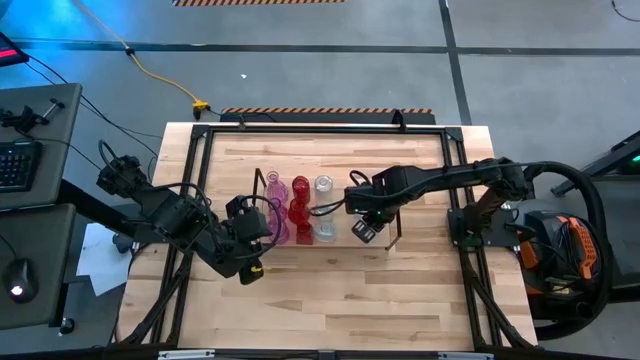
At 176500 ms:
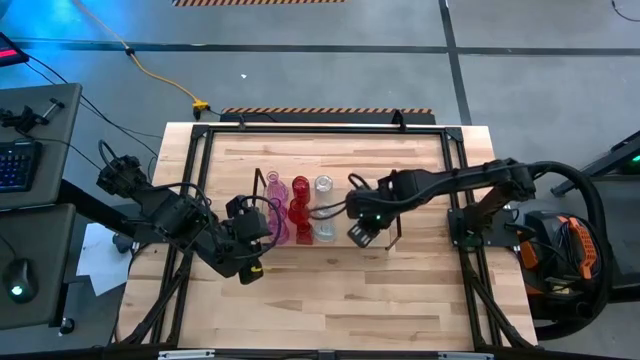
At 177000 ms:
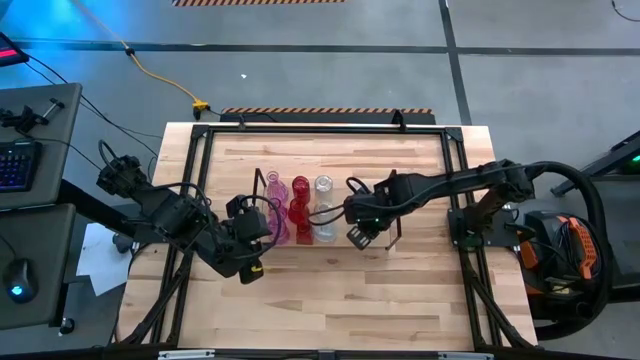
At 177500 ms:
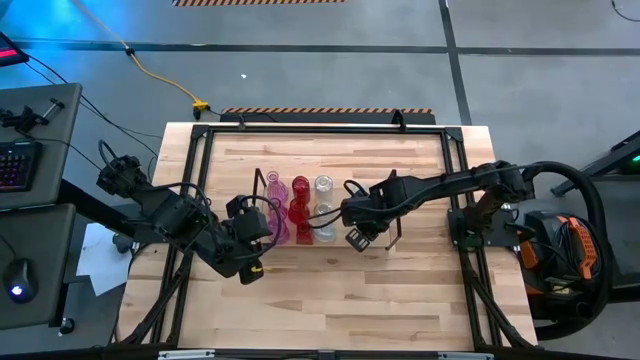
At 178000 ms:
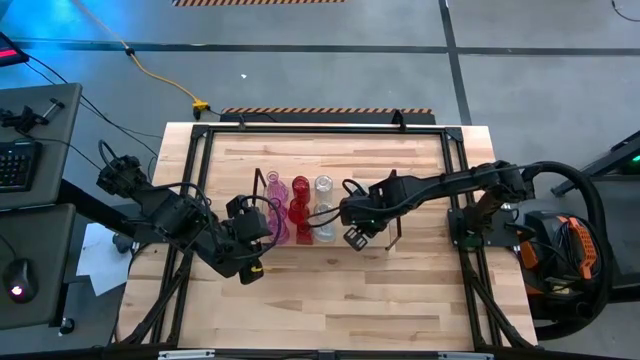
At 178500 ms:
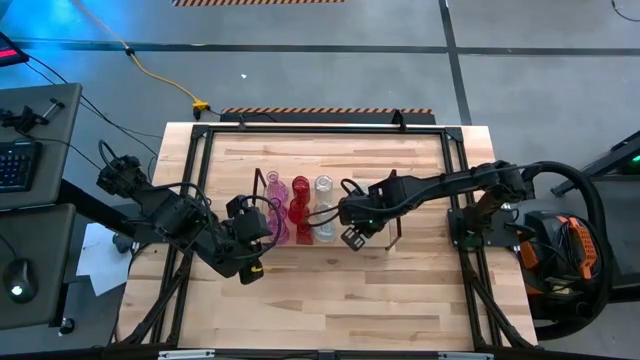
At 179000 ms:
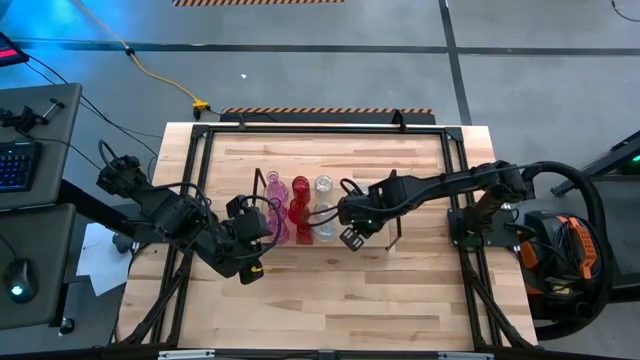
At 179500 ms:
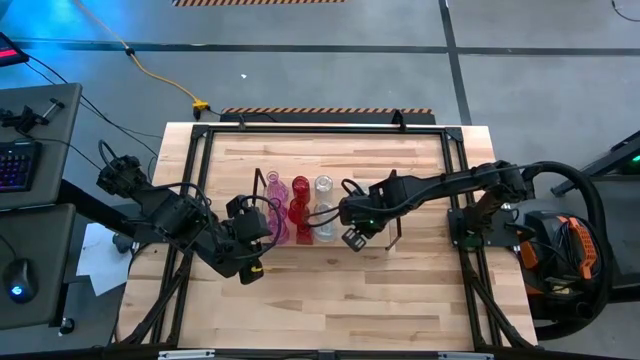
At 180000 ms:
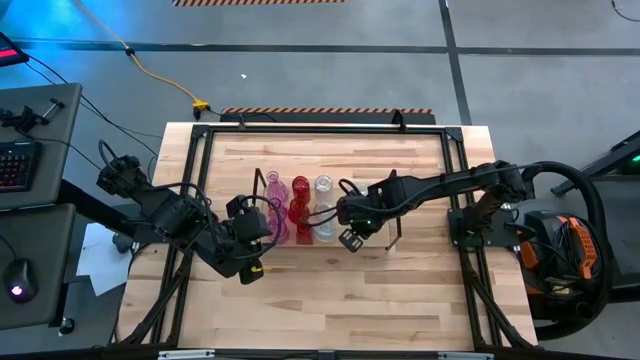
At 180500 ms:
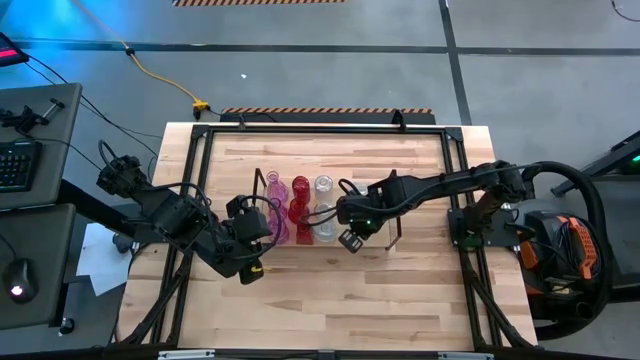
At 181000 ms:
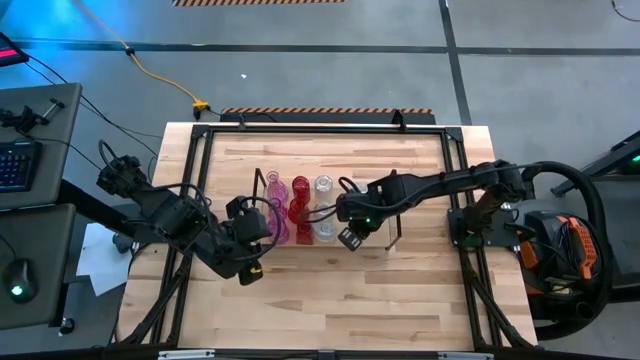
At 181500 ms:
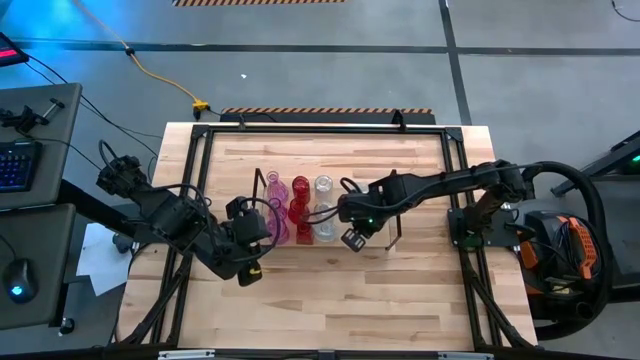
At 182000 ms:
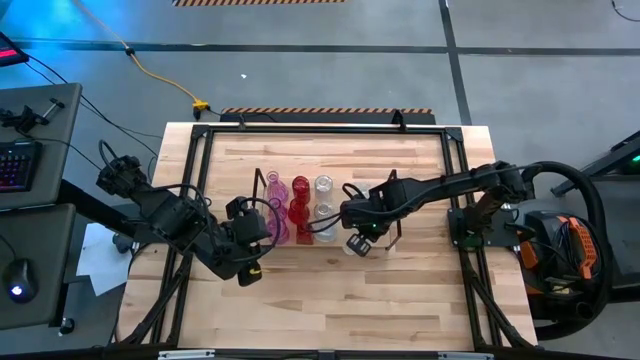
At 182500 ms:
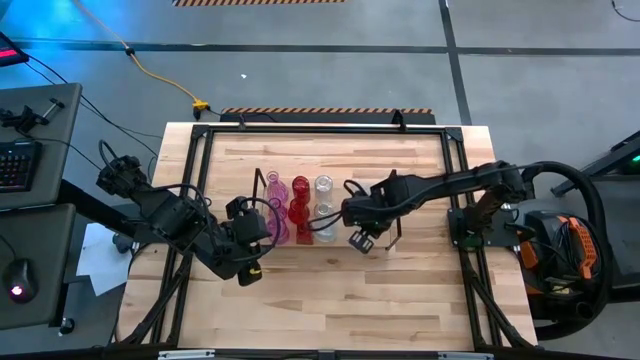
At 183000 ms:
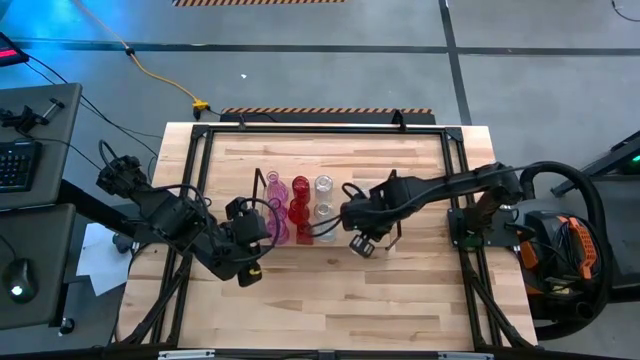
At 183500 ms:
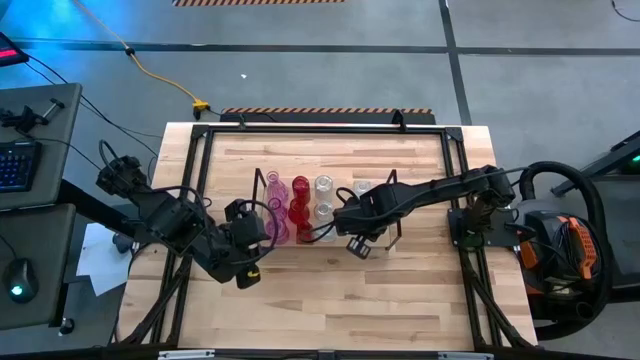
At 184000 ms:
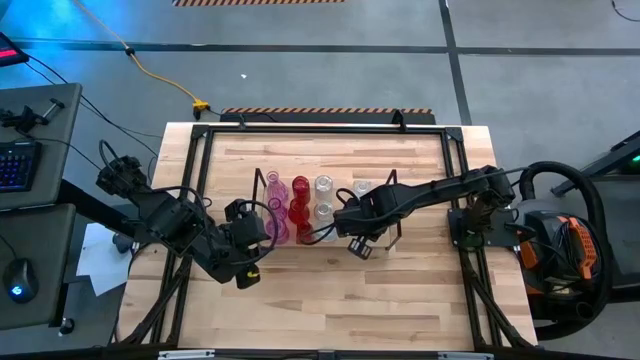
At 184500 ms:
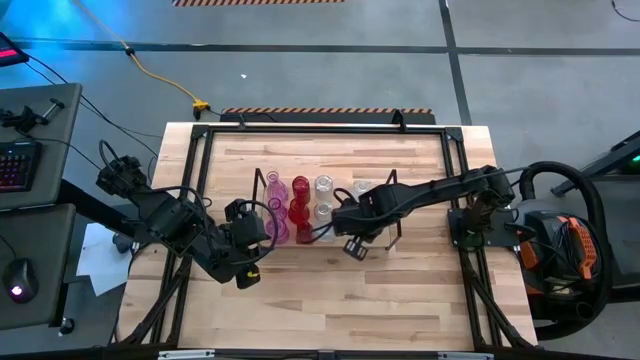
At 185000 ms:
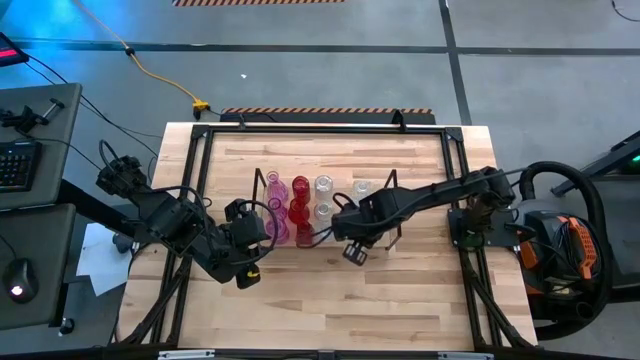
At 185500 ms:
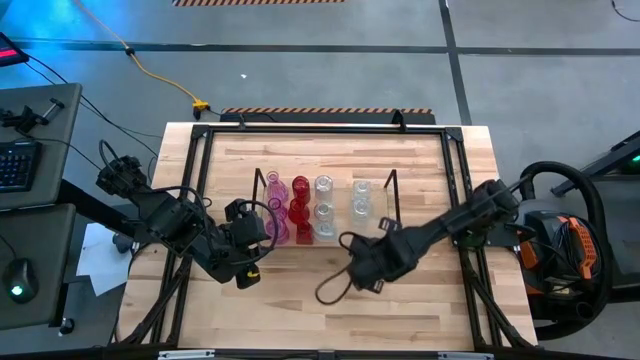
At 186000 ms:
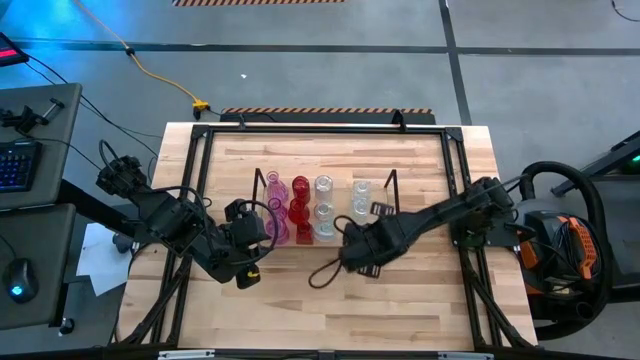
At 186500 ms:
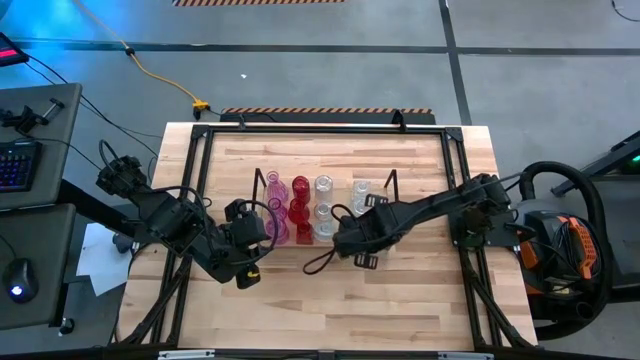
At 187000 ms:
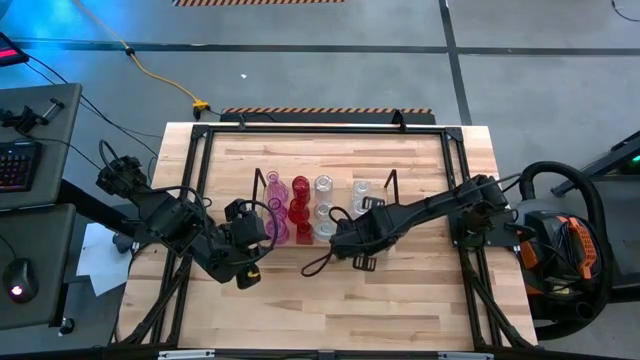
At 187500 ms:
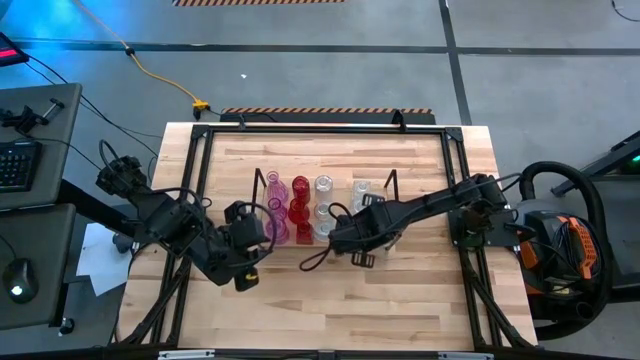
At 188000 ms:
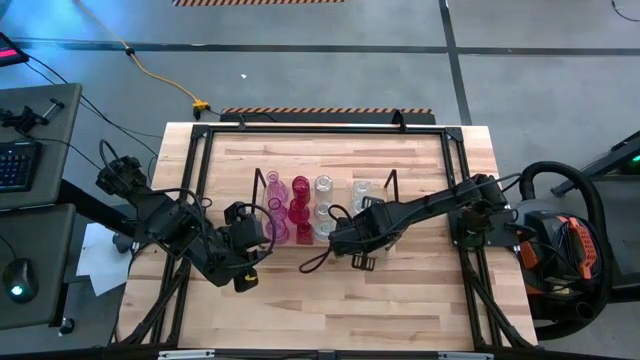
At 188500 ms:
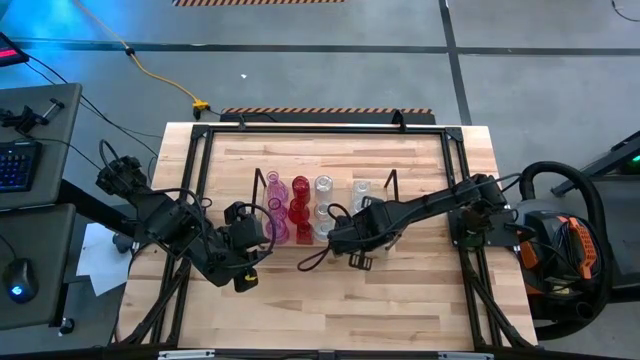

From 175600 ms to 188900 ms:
Task: sort vases onto shelf
Put the transparent vase aligned with the other transparent vases on the shelf

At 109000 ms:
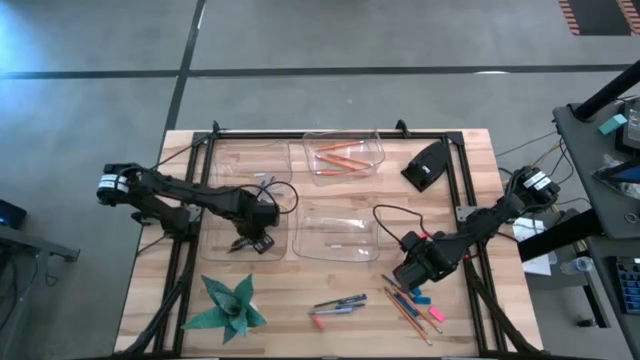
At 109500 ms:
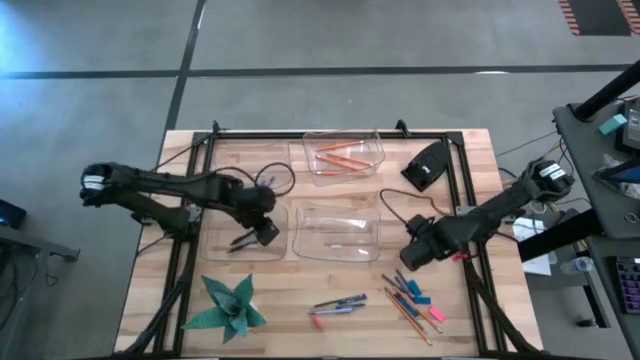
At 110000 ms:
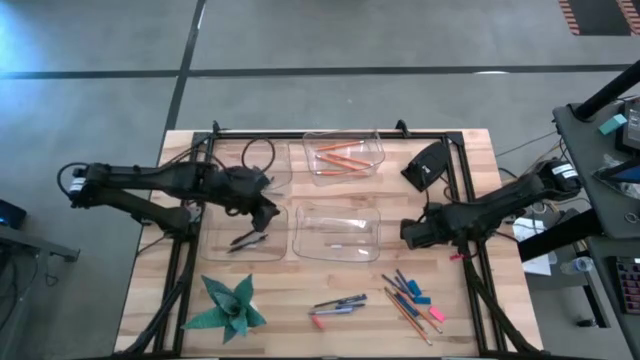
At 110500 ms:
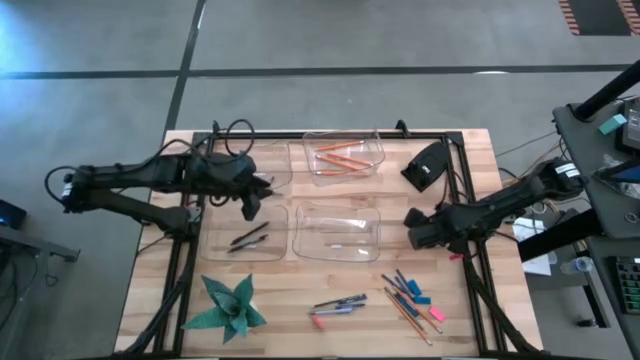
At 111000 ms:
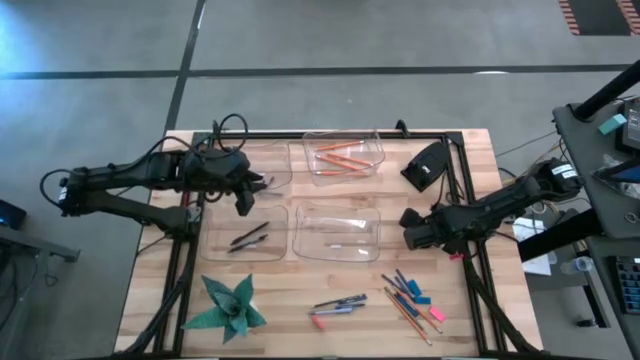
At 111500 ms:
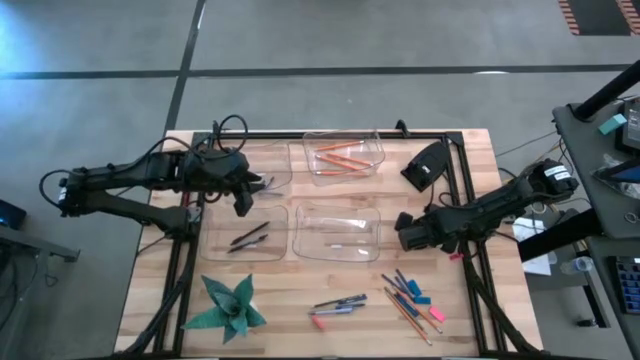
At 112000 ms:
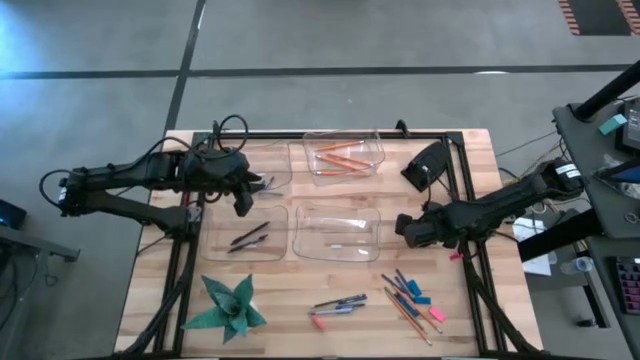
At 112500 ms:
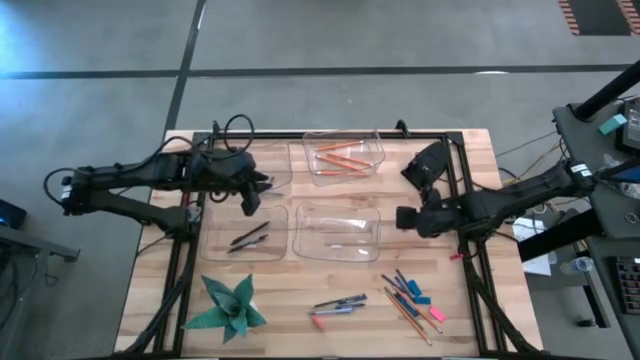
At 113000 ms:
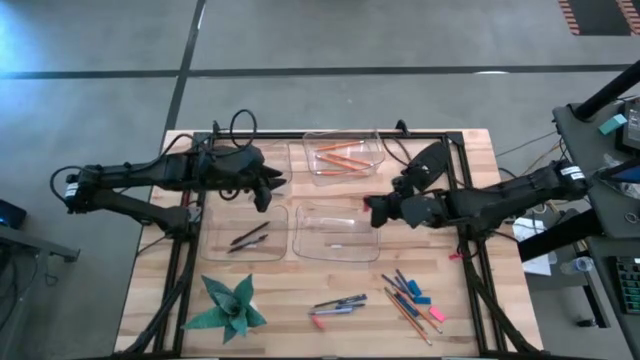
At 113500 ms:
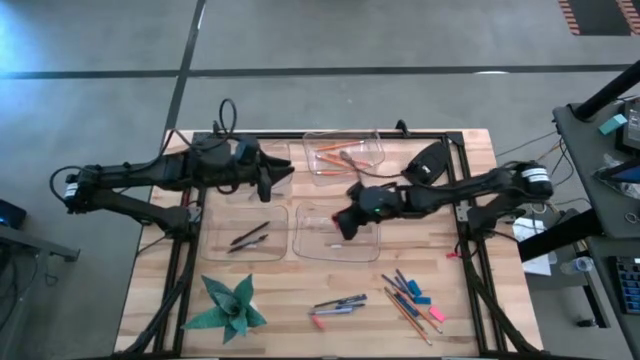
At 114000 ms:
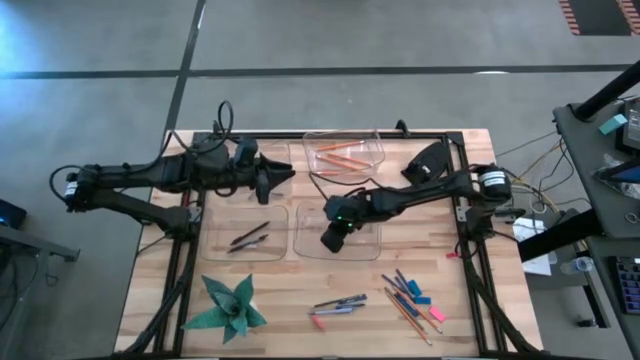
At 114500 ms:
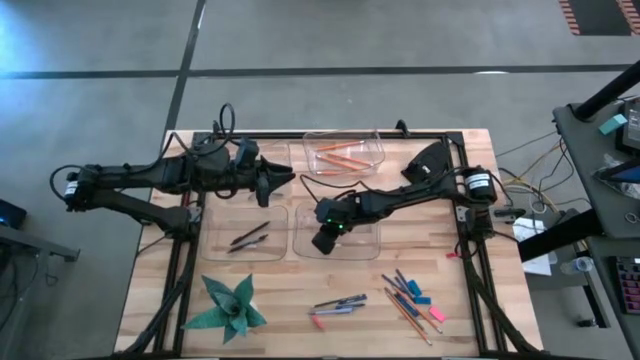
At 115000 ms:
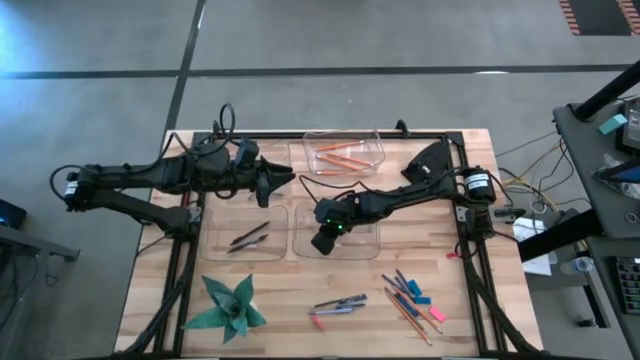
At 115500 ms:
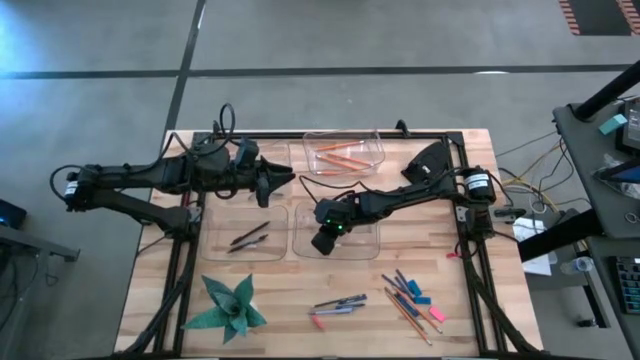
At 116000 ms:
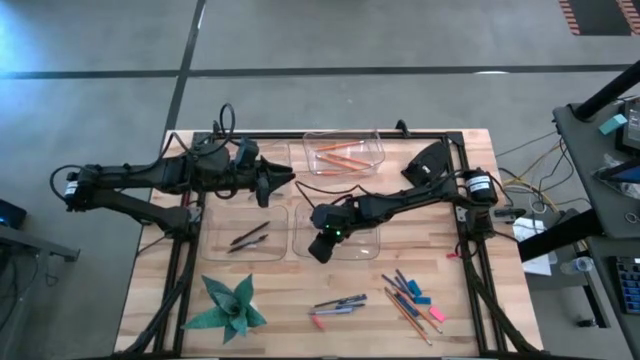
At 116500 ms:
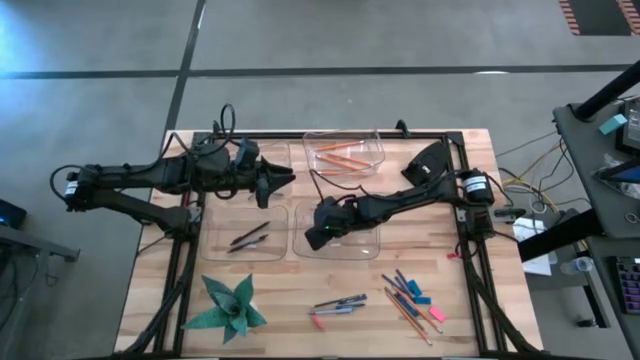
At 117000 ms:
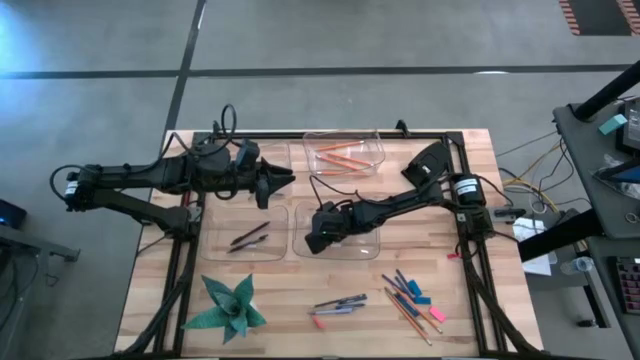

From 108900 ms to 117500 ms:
Task: Sort crayons/erasers/pens/pencils in bins
Put the orange eraser into the bottom right transparent bin
